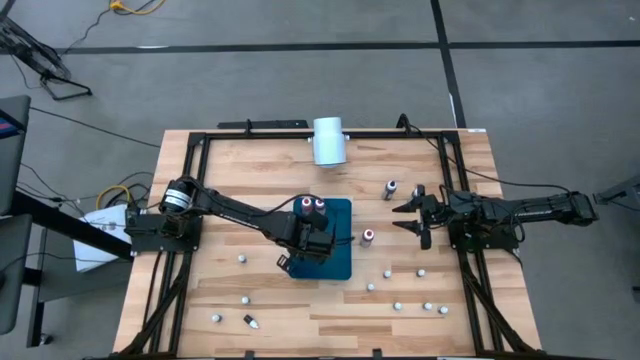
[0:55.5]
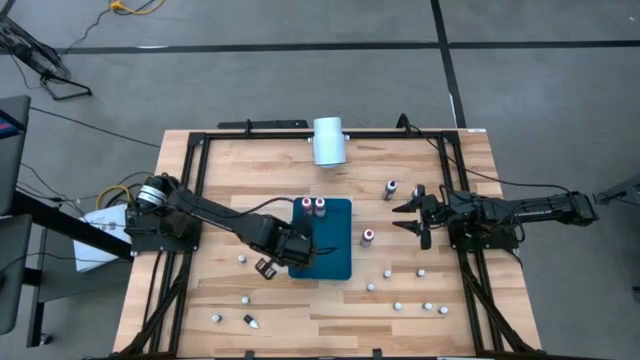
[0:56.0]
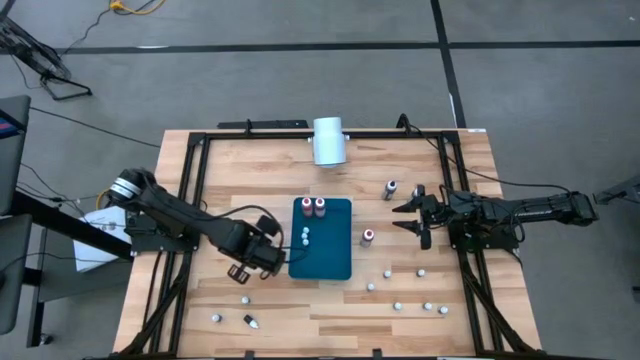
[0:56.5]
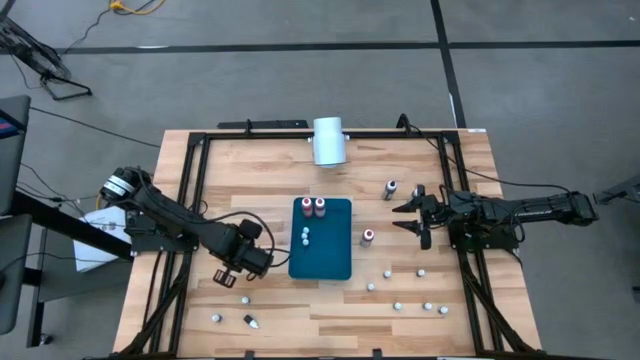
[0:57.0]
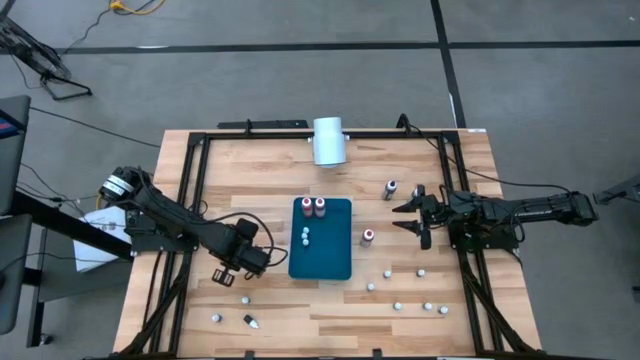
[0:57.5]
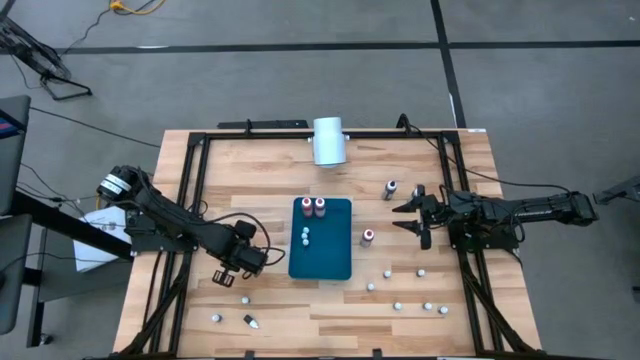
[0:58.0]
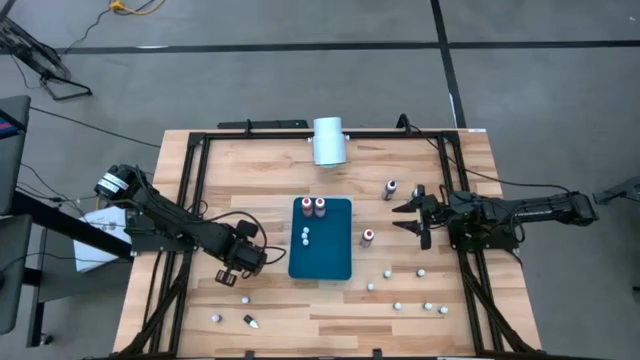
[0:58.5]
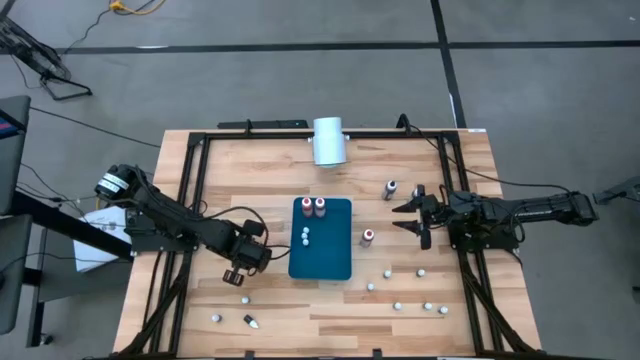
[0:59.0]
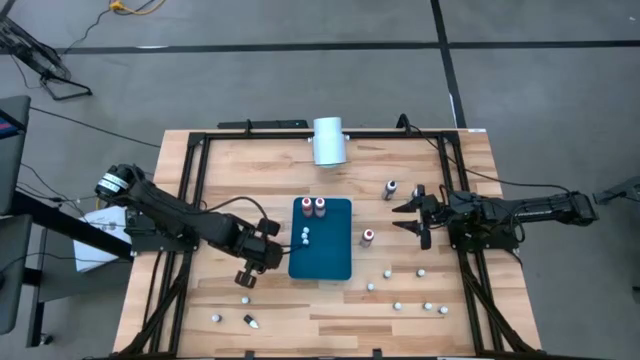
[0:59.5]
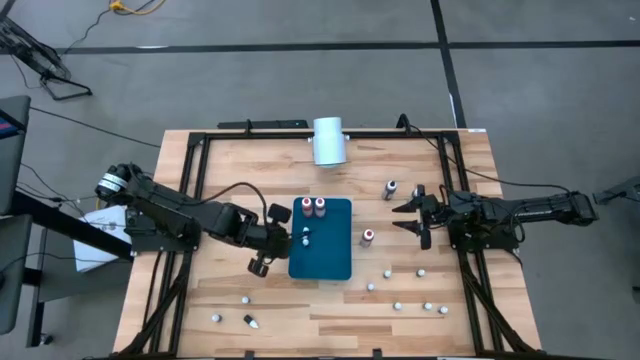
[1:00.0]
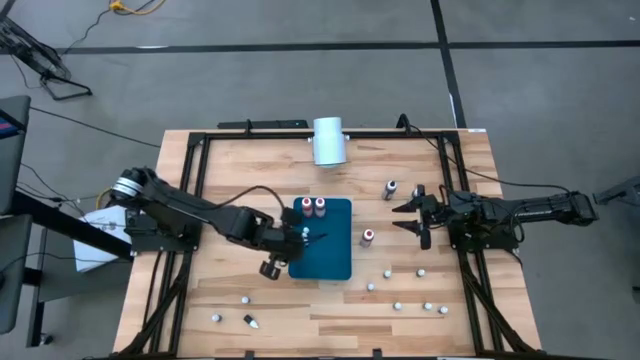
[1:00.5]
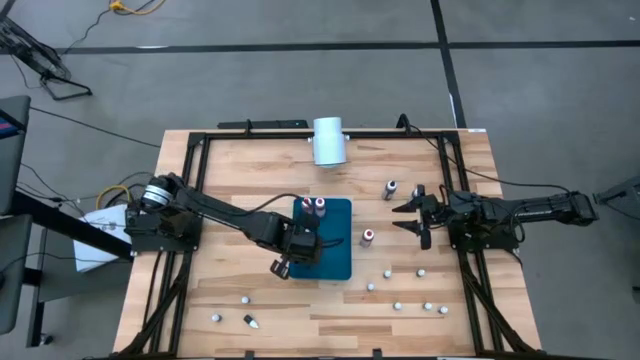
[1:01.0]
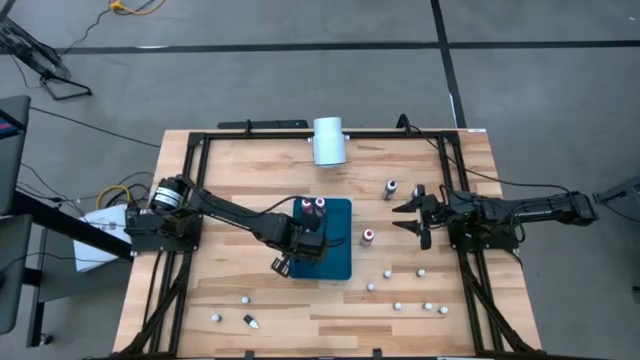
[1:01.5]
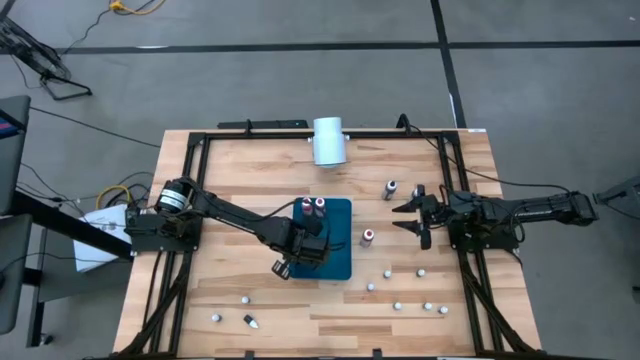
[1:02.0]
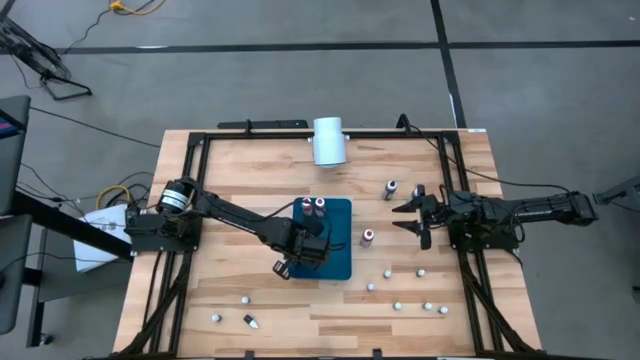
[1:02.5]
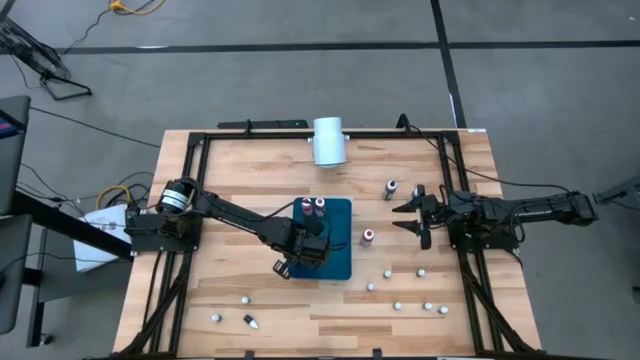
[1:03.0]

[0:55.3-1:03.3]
Task: Pick & Place food coloring
Put the small purple food coloring bottle into the blue bin

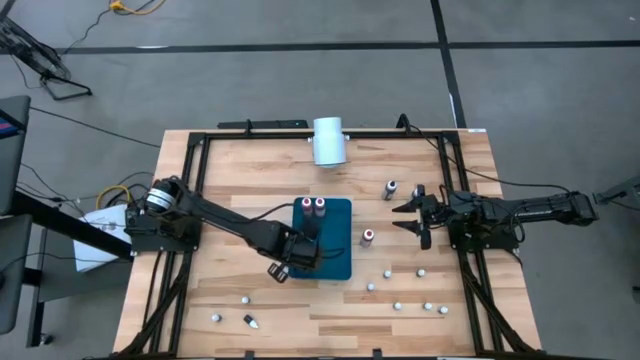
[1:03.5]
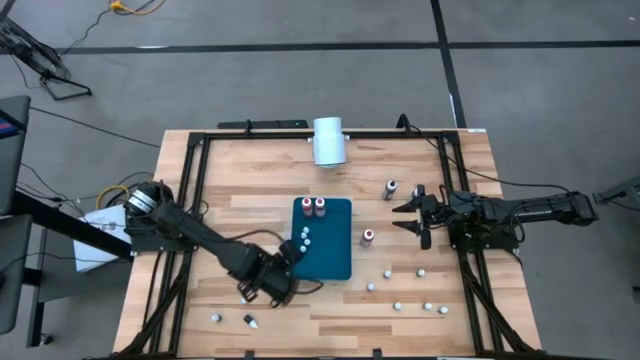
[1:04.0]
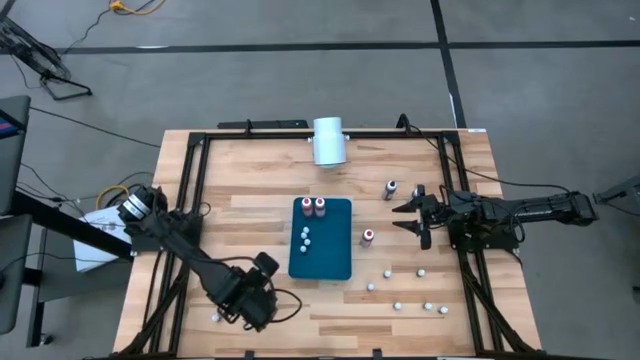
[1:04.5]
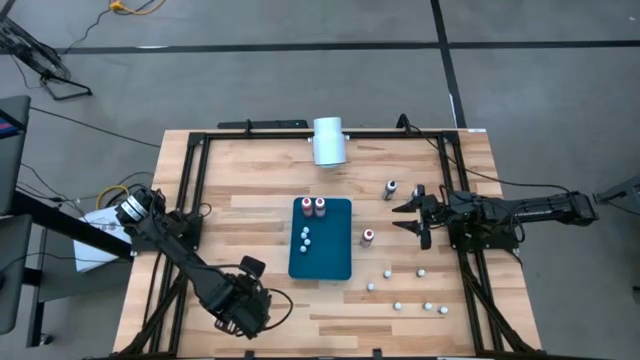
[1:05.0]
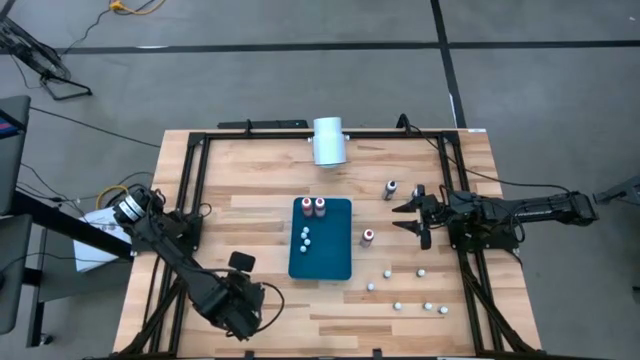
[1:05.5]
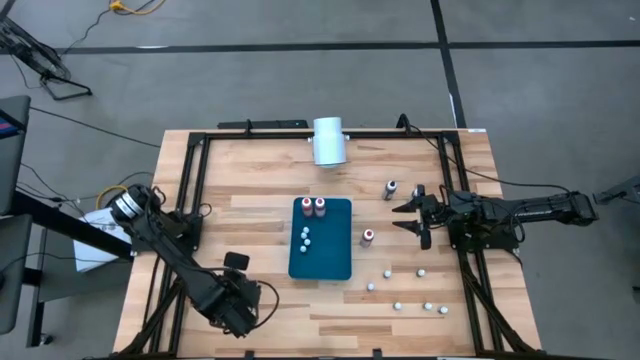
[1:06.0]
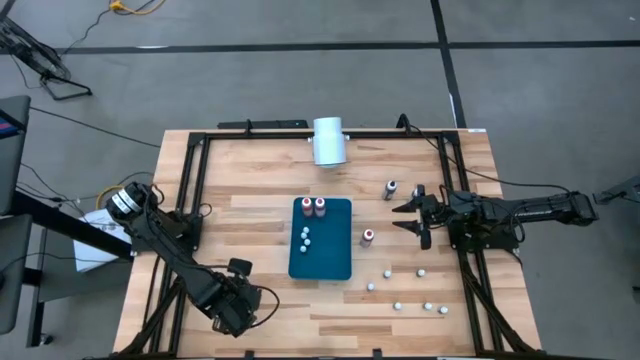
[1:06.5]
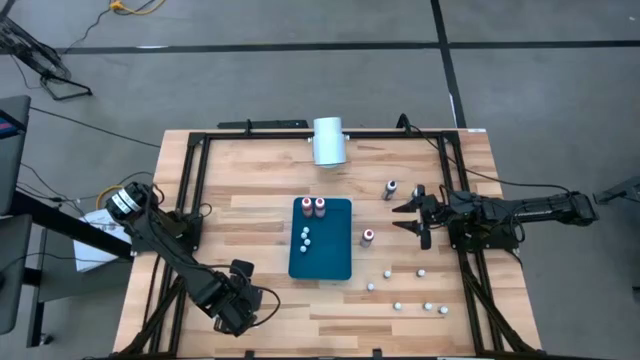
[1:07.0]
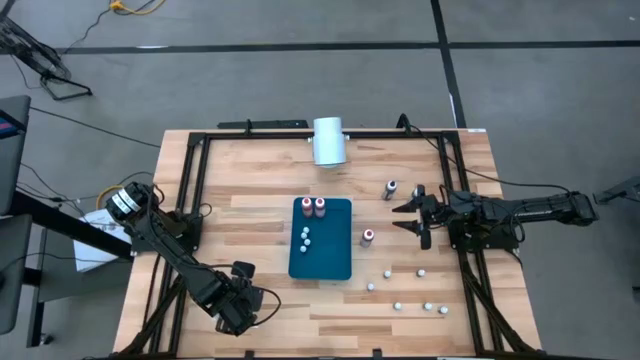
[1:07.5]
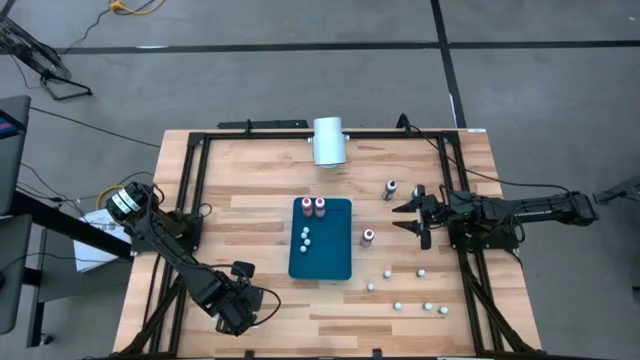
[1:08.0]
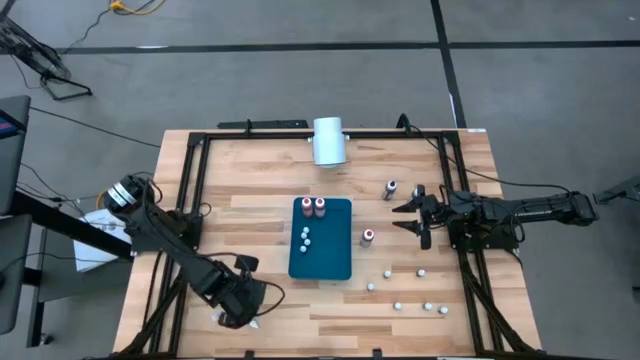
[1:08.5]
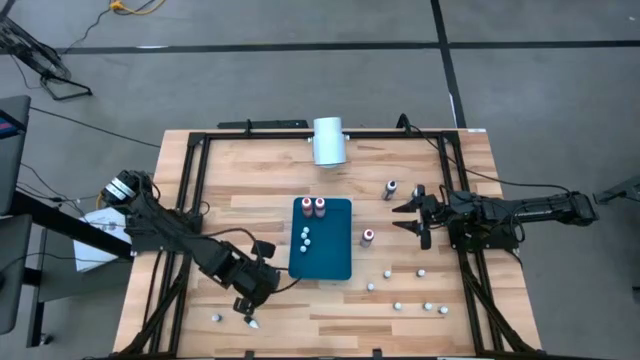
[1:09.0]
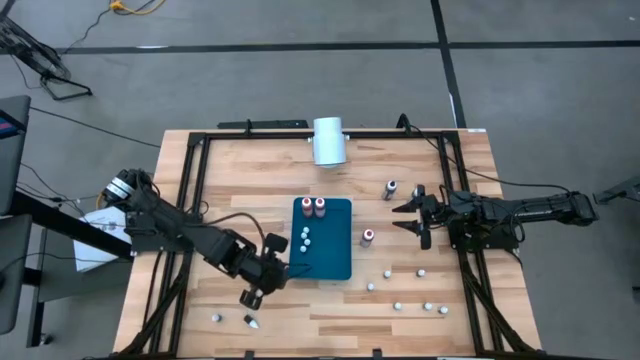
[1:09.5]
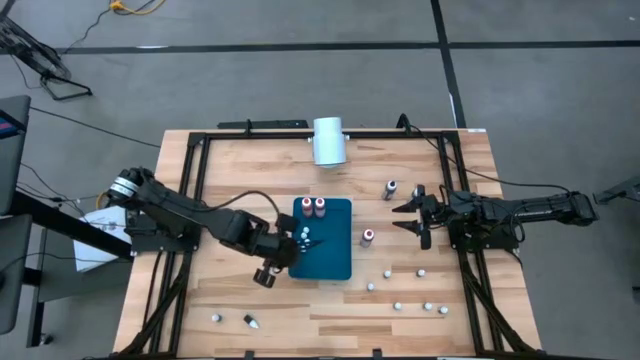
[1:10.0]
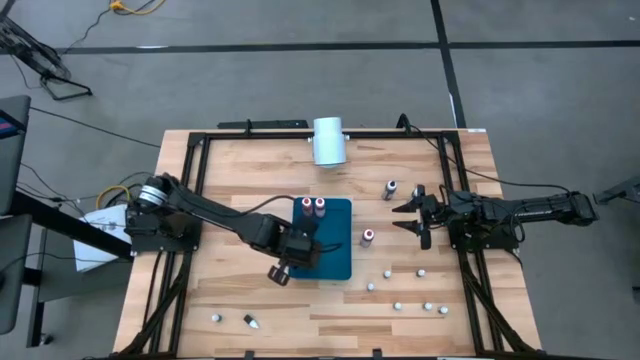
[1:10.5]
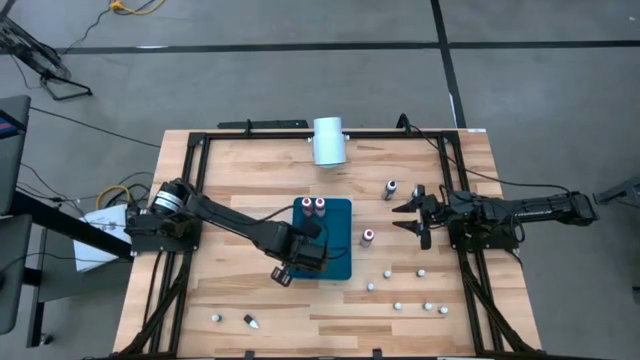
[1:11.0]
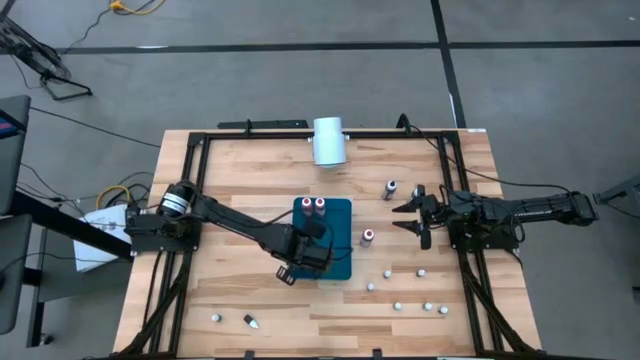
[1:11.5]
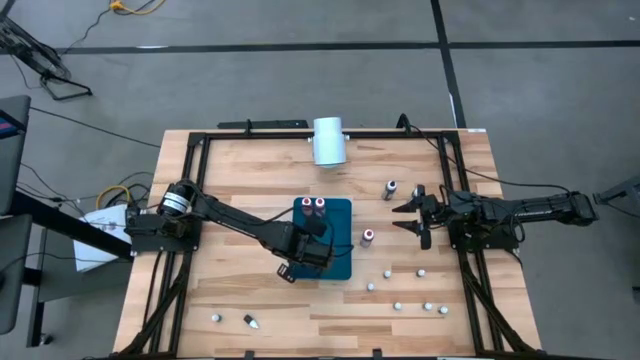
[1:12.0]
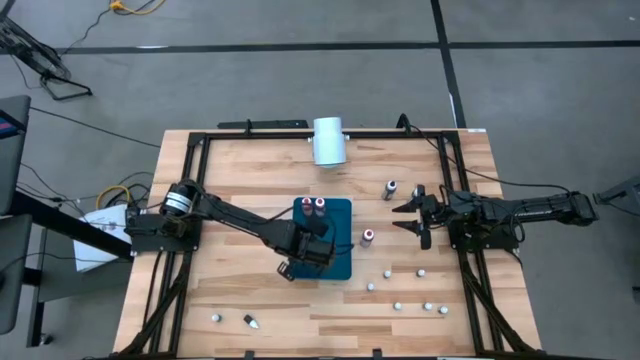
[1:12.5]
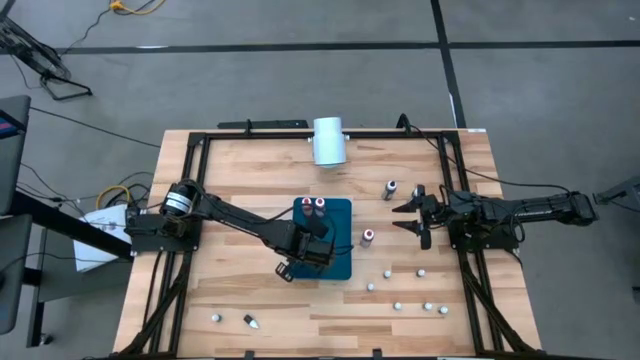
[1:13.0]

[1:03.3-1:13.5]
Put the small black food coloring bottle into the blue bin

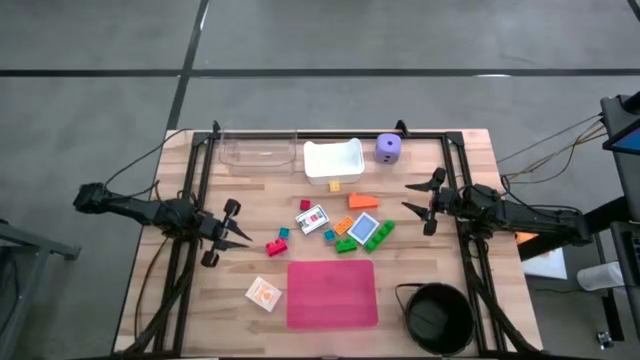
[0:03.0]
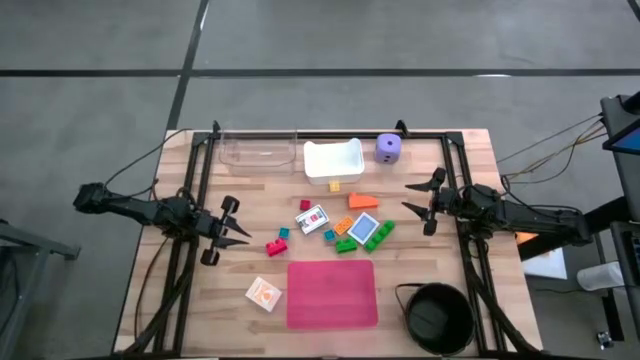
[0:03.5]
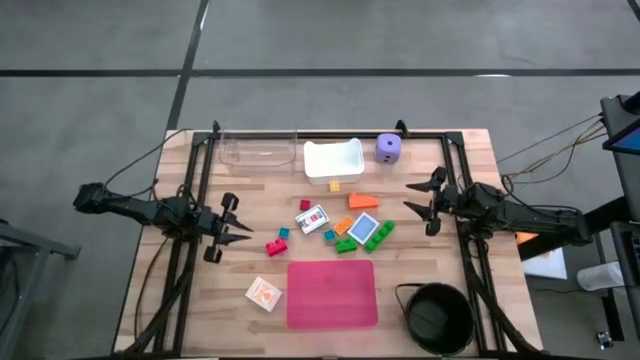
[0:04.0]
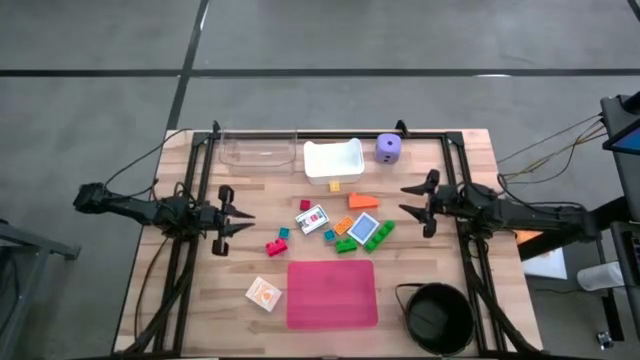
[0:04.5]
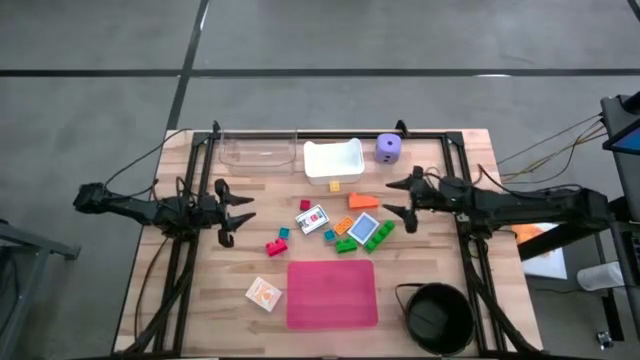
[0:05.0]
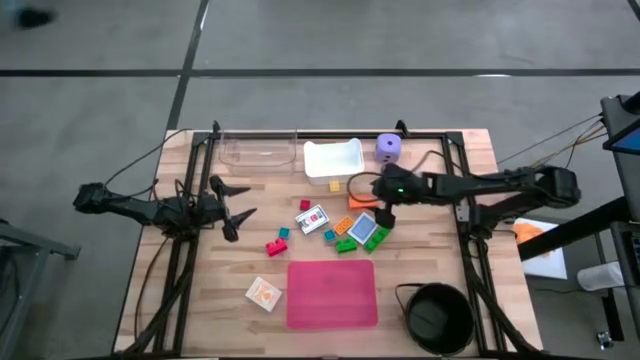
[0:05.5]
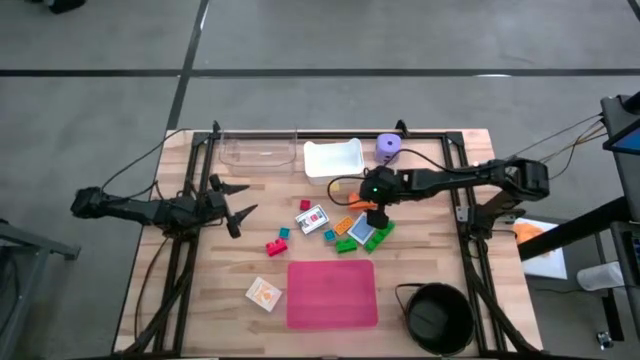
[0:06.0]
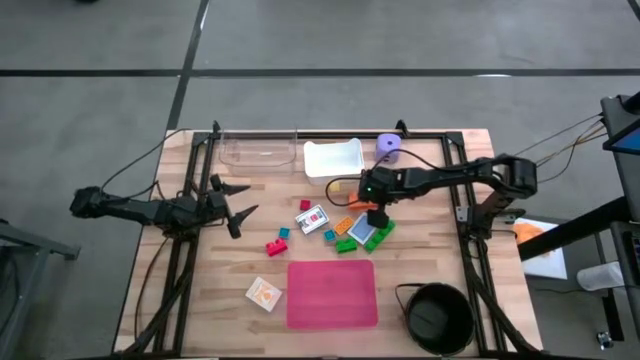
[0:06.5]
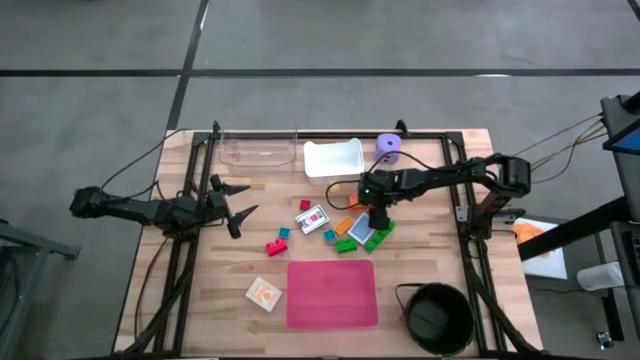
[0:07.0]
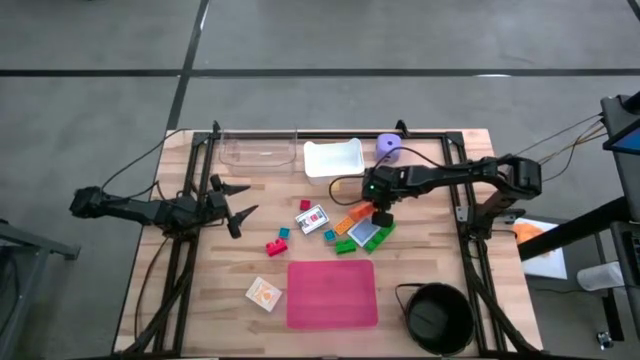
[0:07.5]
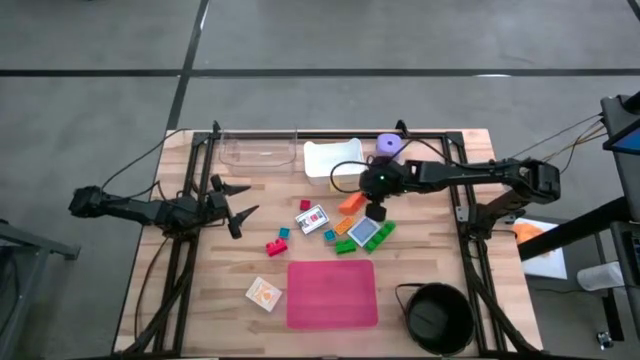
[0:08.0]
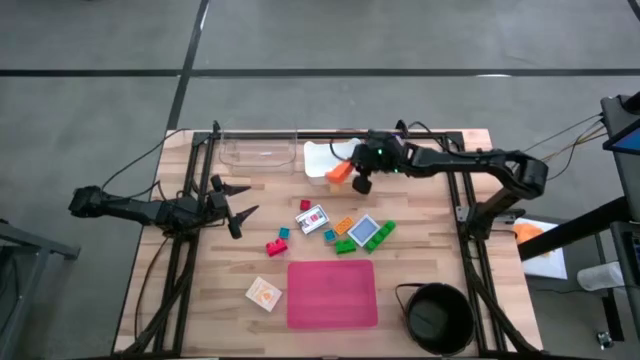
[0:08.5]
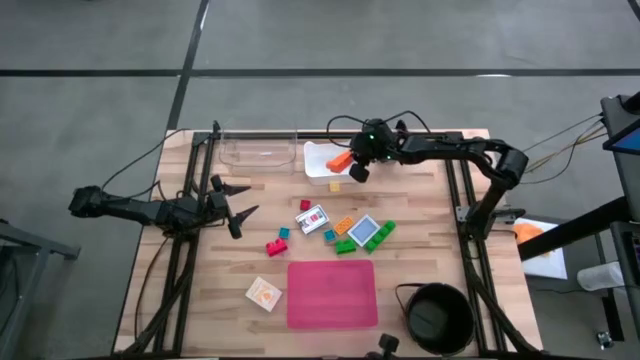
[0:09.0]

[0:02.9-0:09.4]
Task: Pick & Place Toys
Put the orange one stud game piece into the white bin
